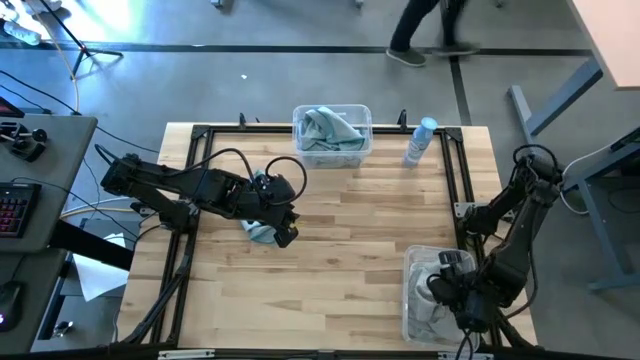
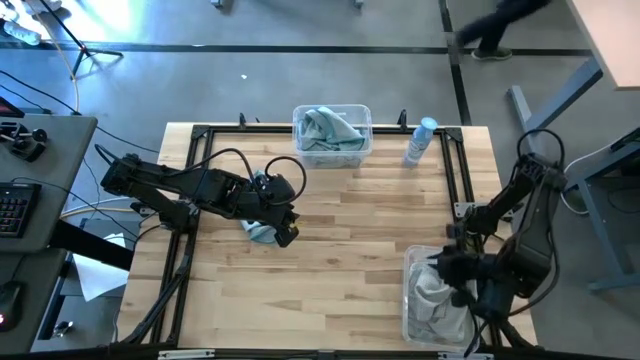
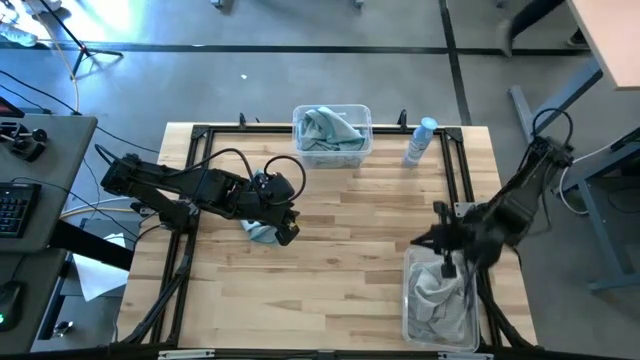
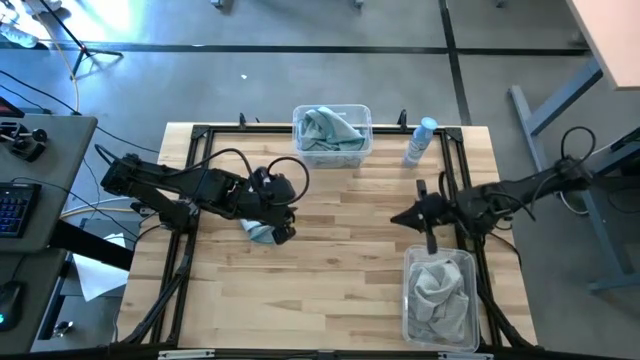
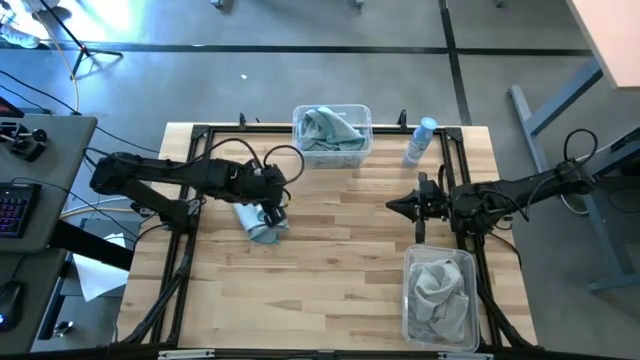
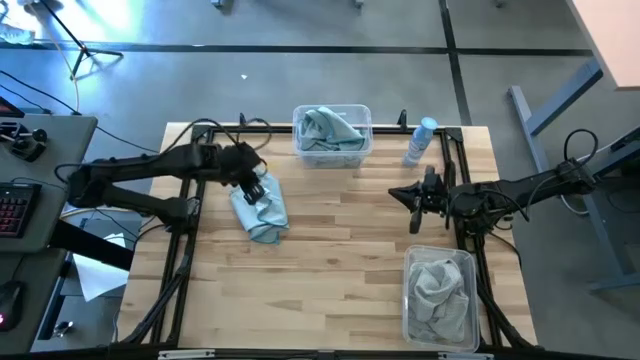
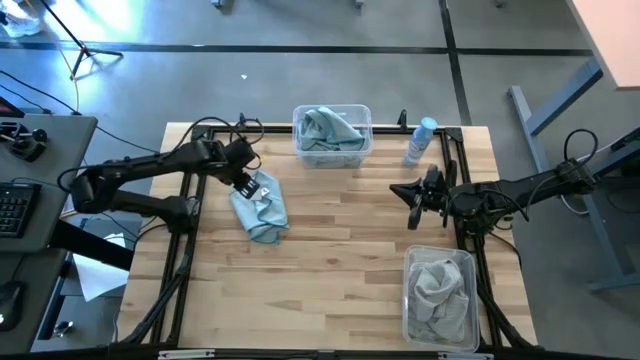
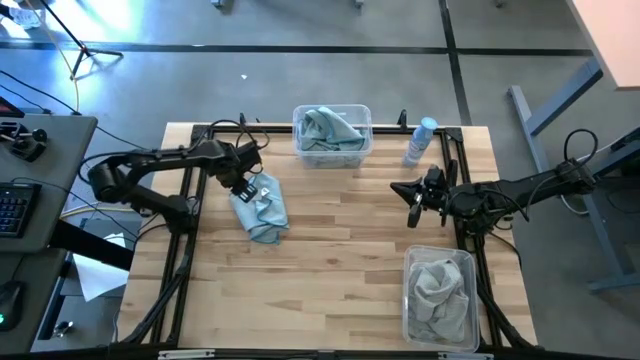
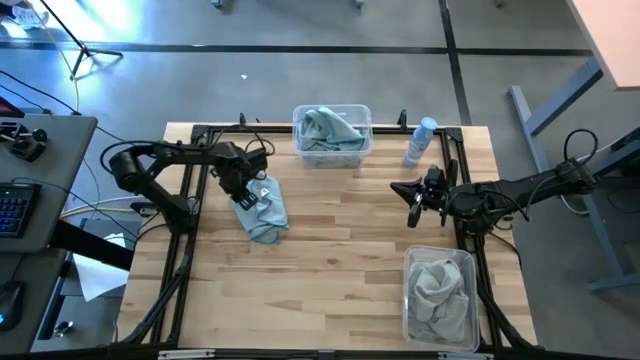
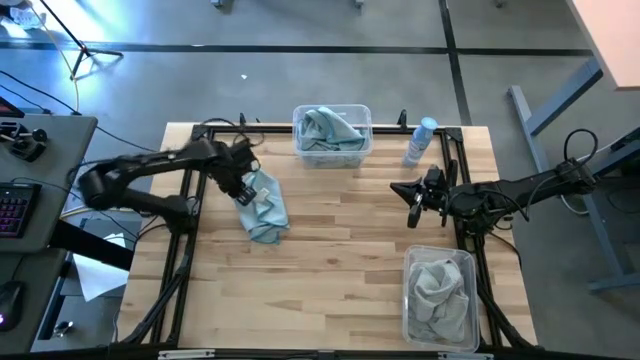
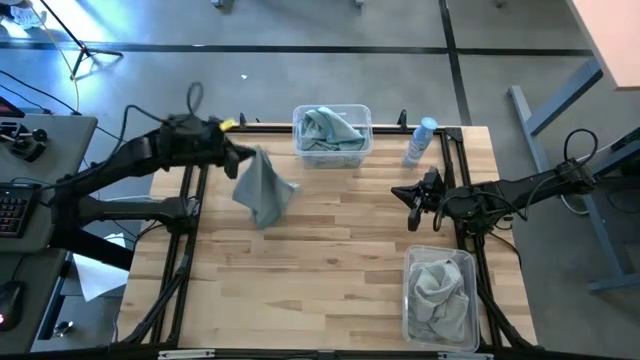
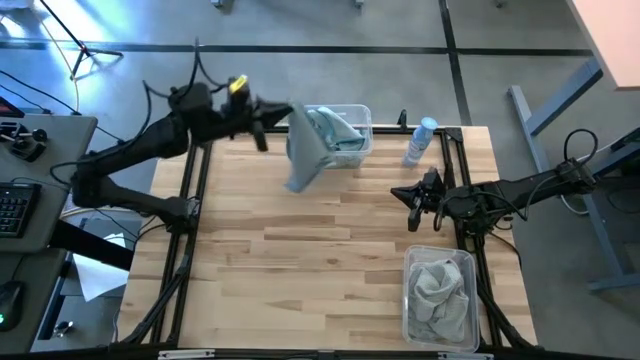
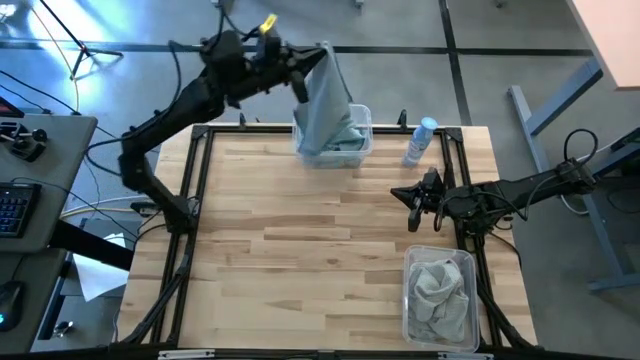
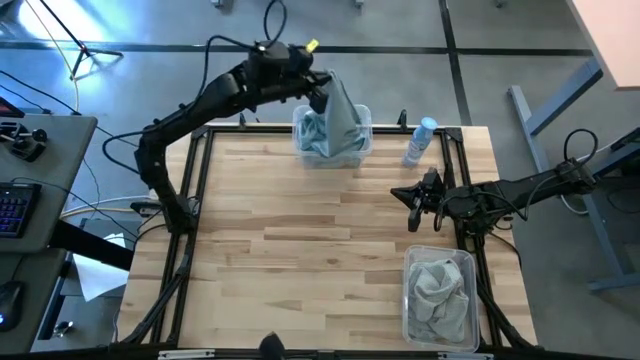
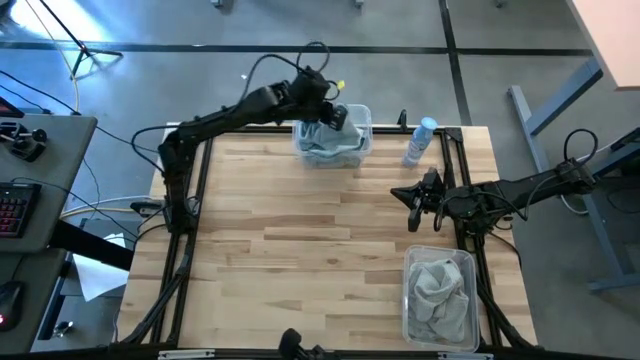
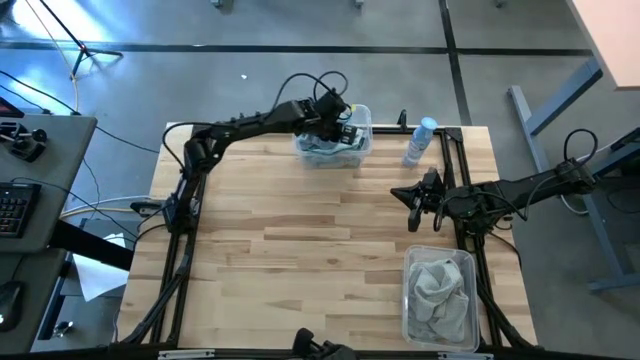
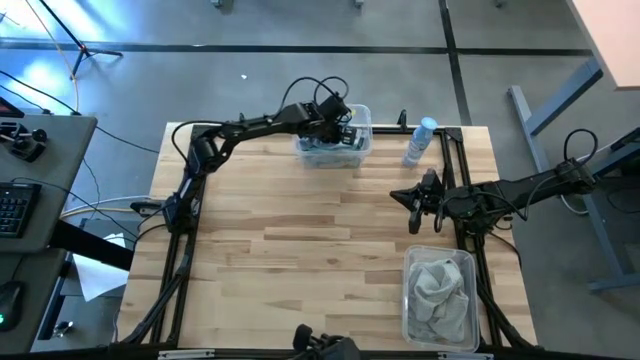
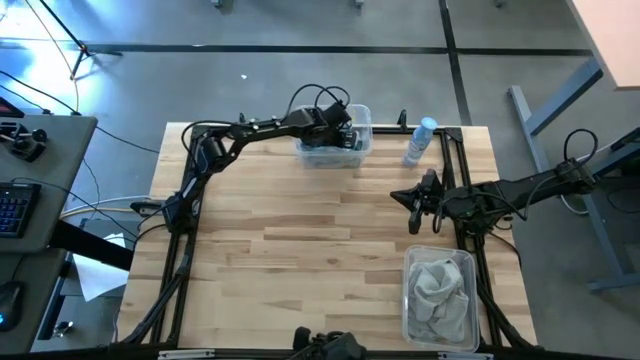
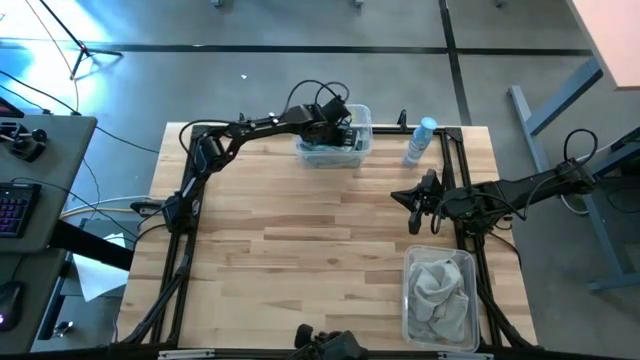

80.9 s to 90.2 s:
Task: Sort microfiber towel by color & place in baskets
Put the blue microfiber towel into the top transparent bin

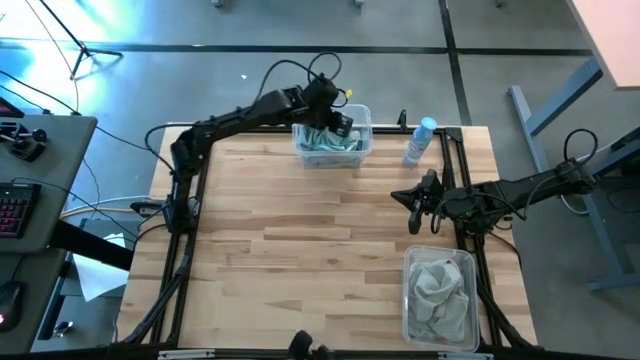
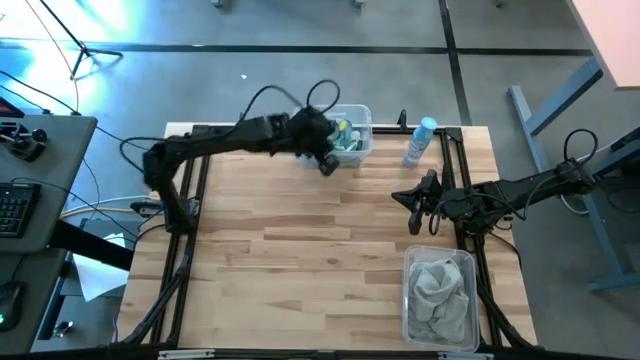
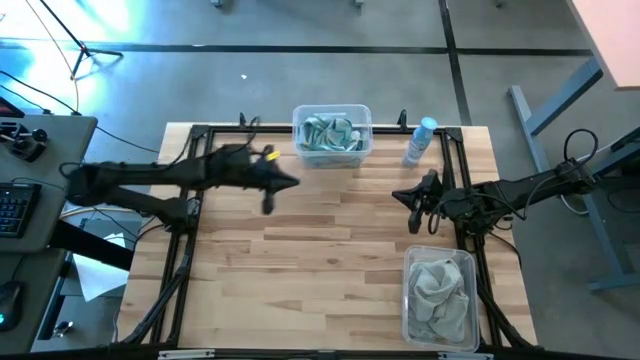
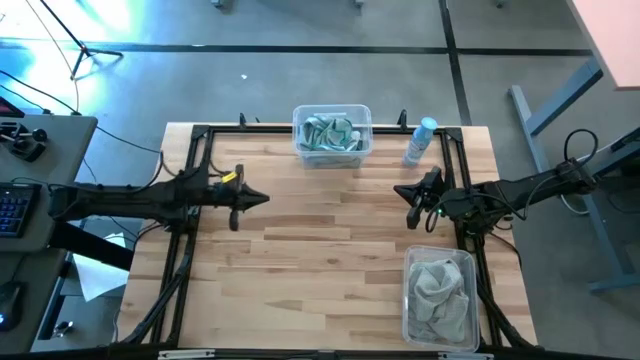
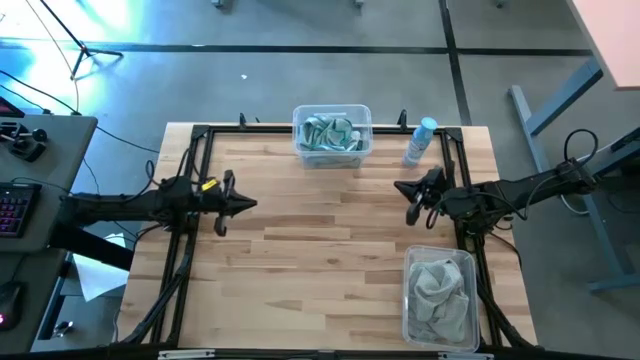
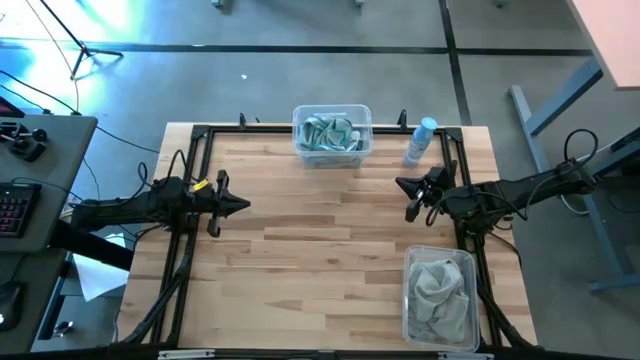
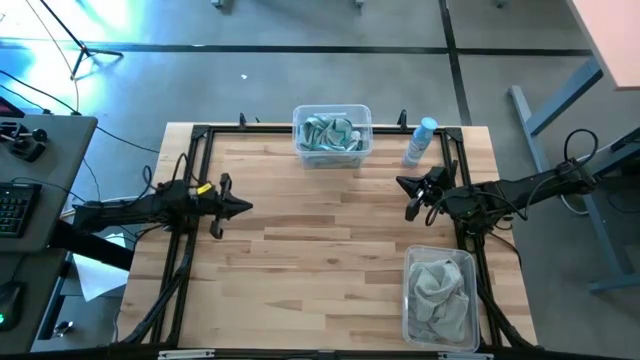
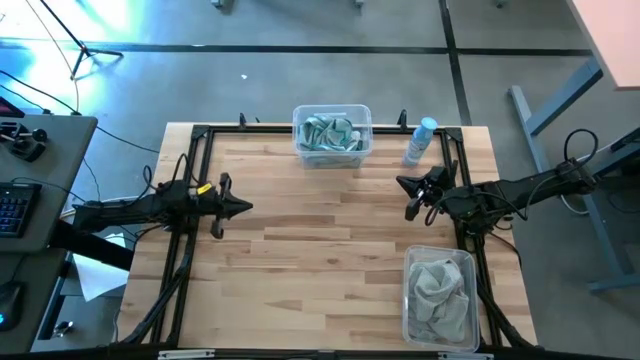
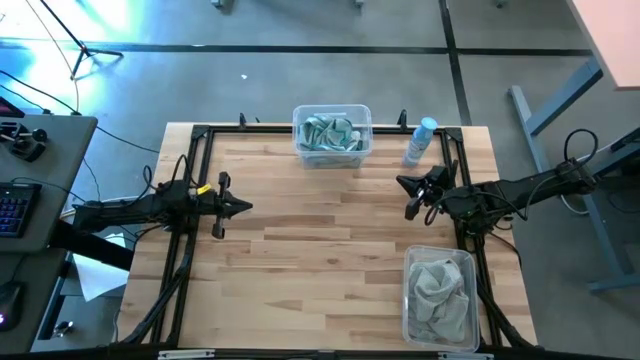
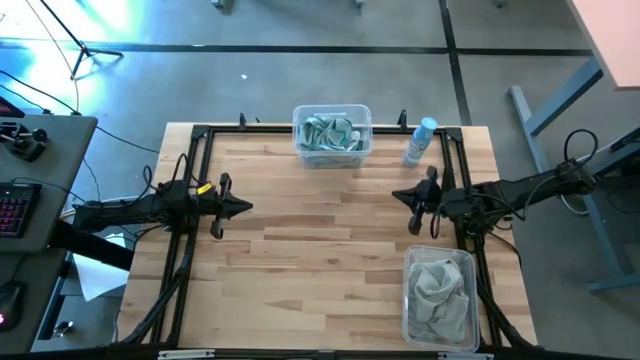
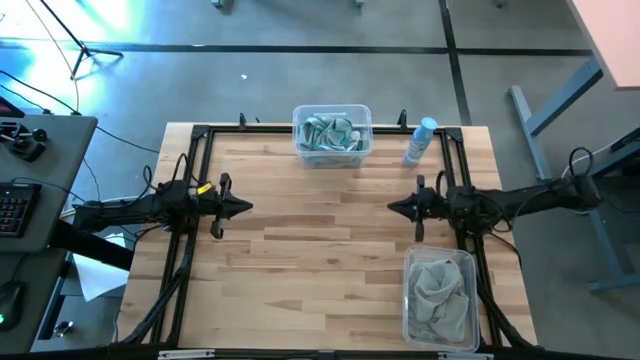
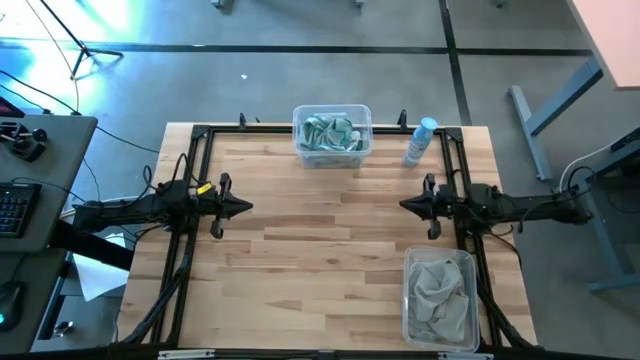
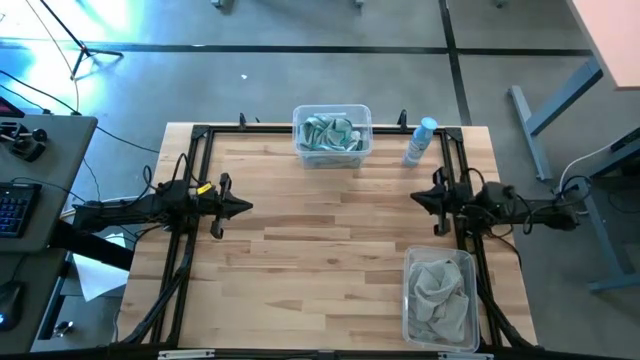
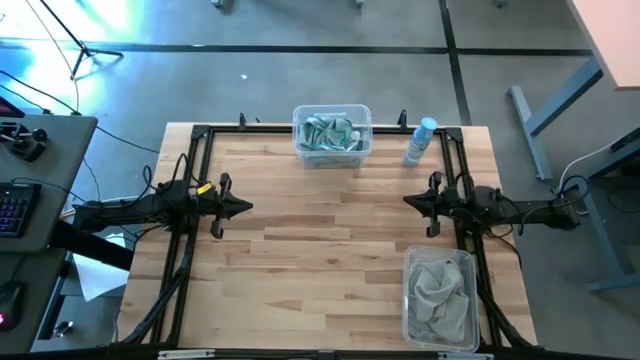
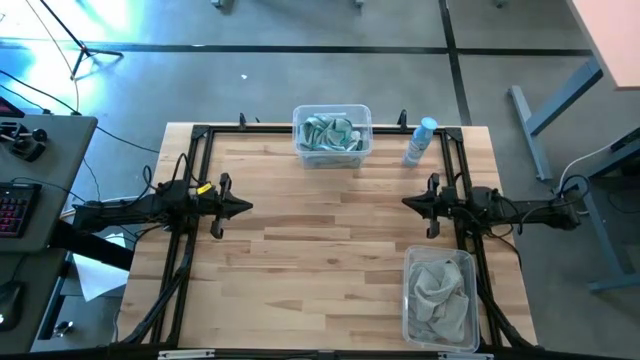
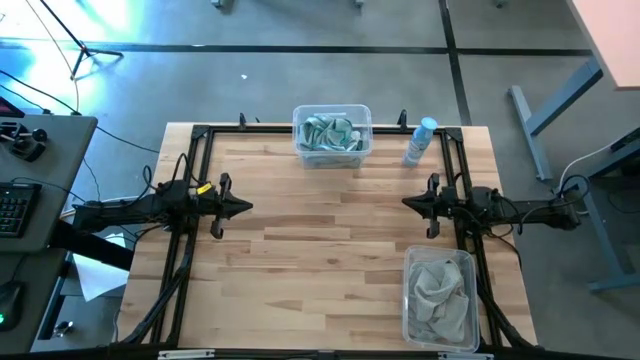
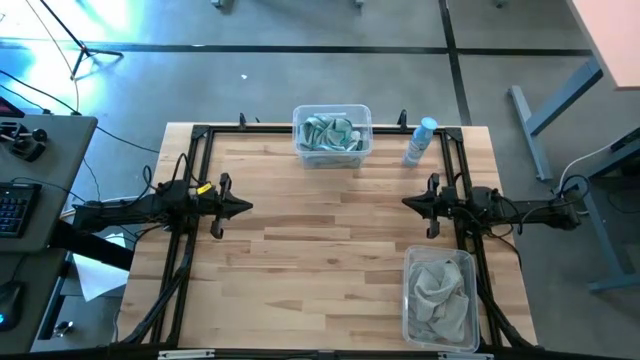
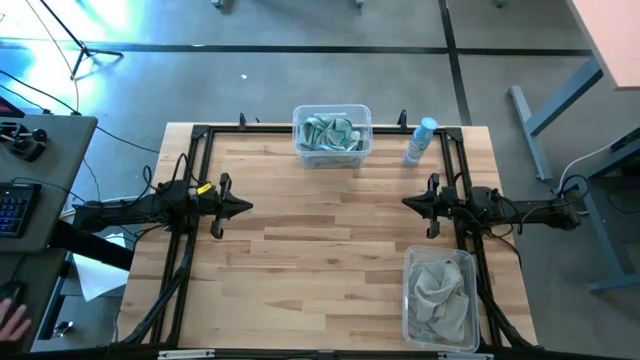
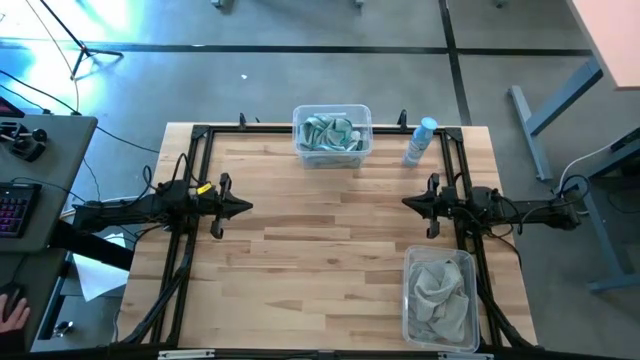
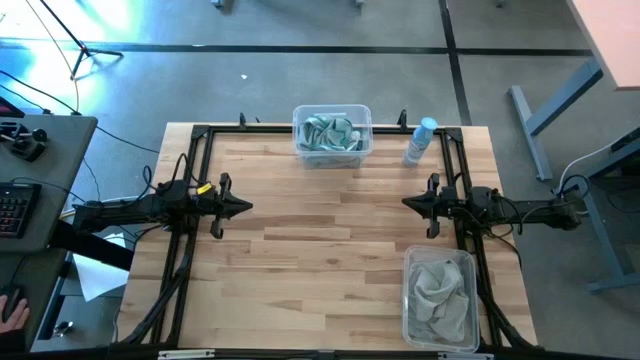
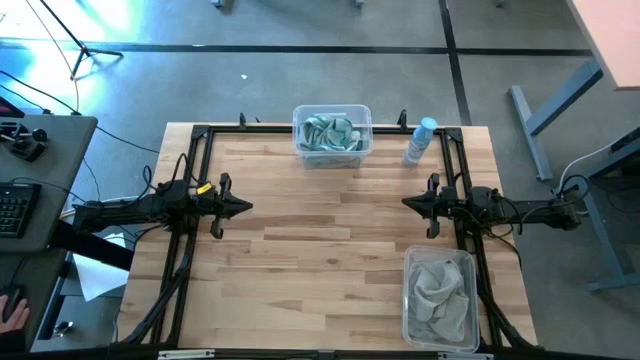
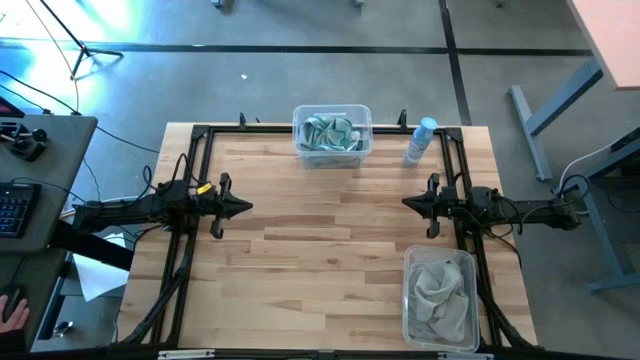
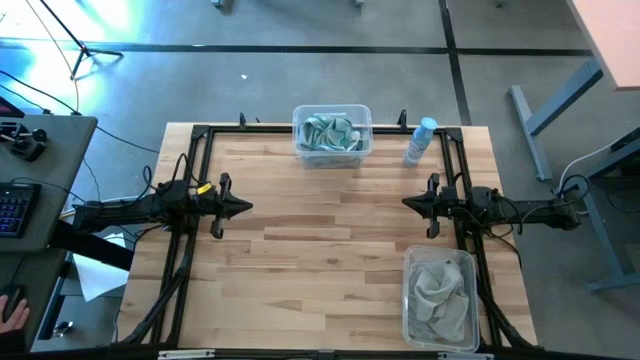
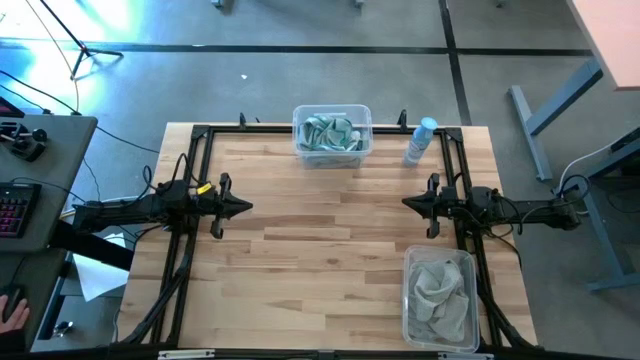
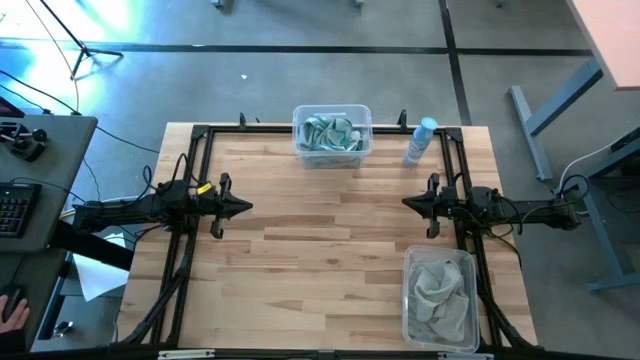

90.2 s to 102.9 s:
Return to Home Position
